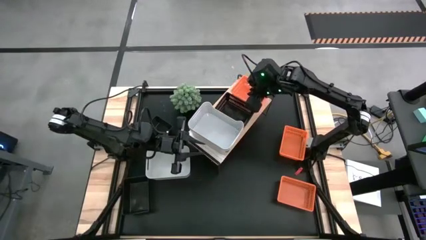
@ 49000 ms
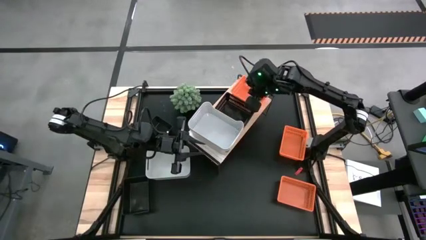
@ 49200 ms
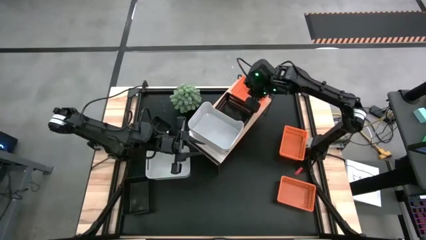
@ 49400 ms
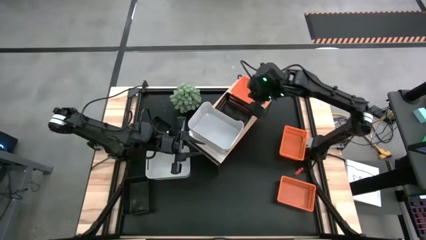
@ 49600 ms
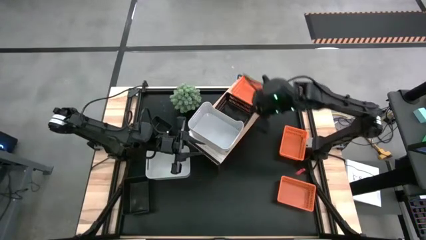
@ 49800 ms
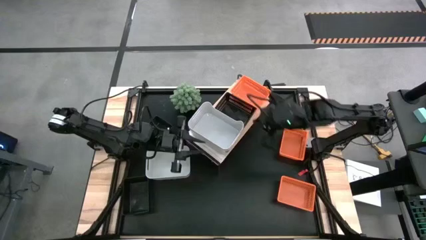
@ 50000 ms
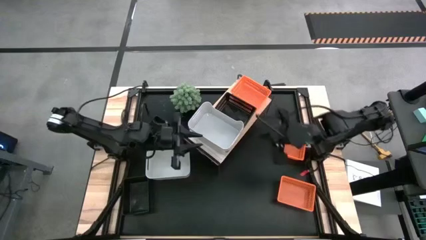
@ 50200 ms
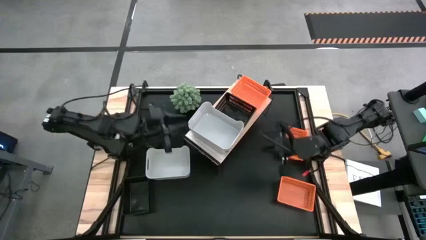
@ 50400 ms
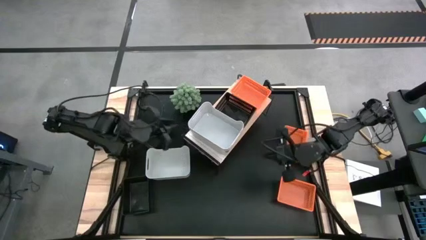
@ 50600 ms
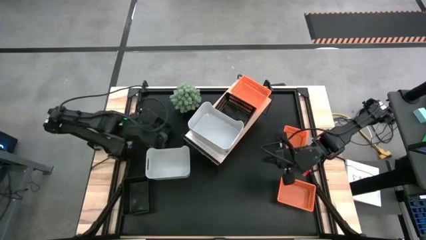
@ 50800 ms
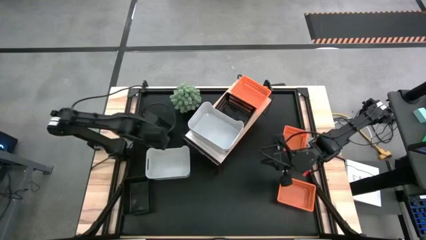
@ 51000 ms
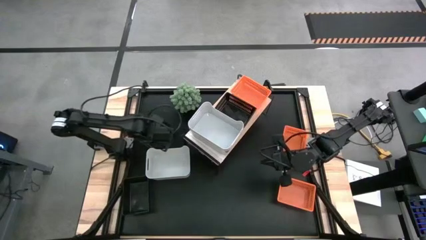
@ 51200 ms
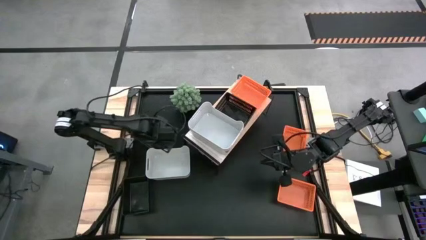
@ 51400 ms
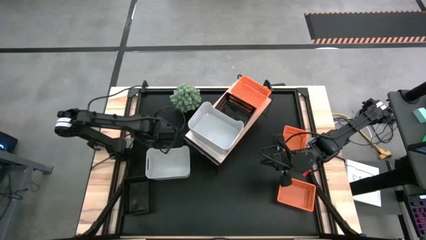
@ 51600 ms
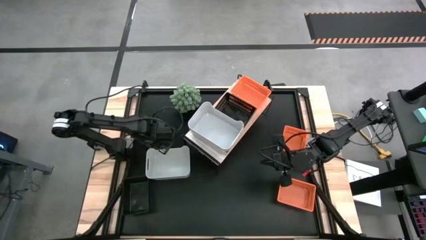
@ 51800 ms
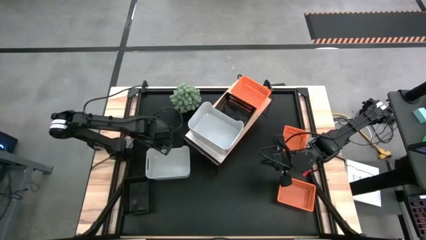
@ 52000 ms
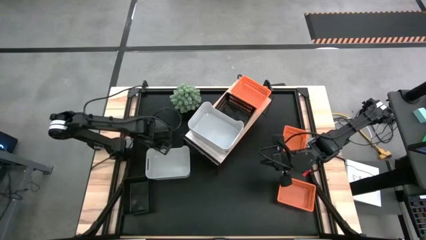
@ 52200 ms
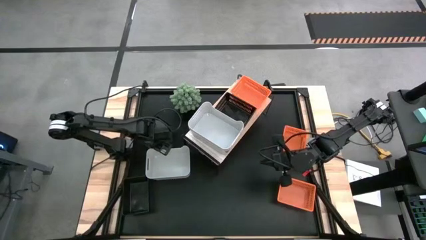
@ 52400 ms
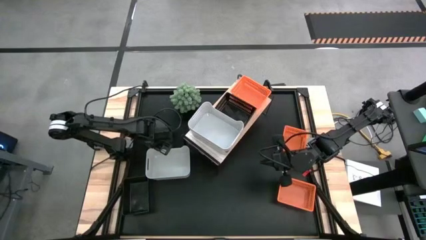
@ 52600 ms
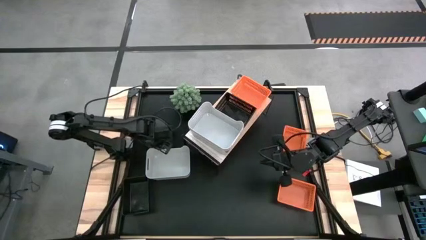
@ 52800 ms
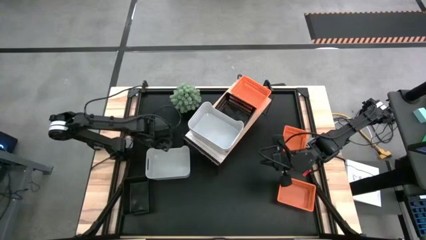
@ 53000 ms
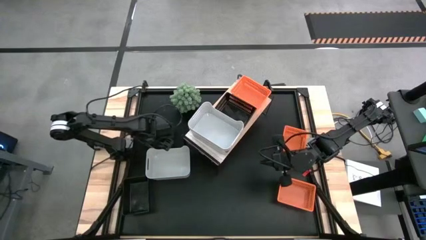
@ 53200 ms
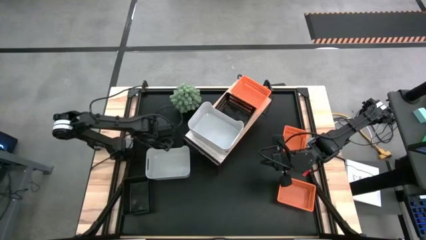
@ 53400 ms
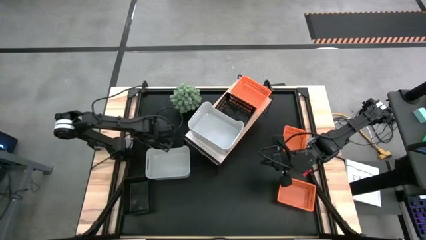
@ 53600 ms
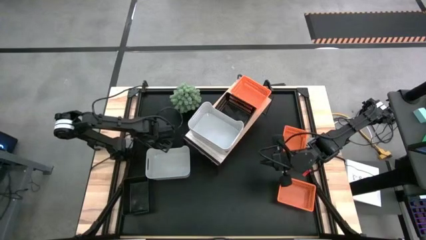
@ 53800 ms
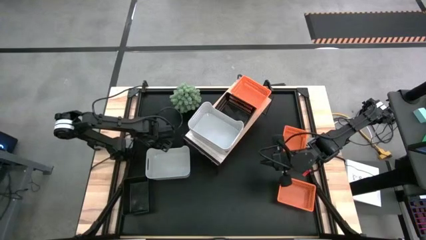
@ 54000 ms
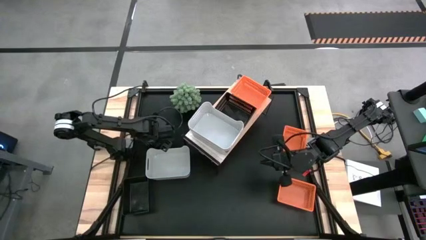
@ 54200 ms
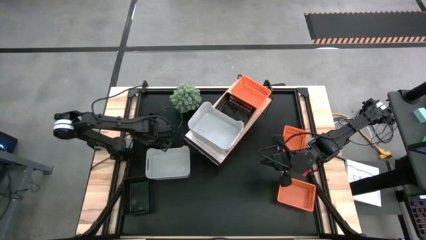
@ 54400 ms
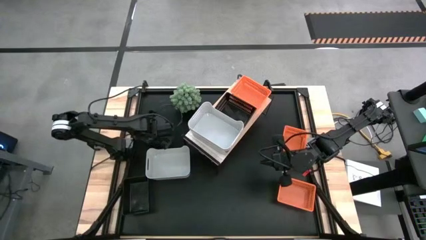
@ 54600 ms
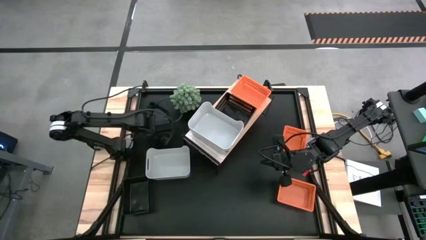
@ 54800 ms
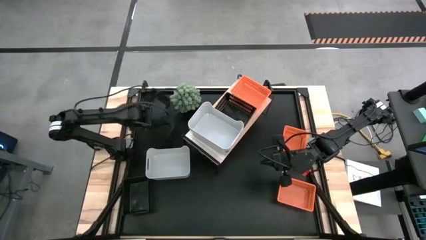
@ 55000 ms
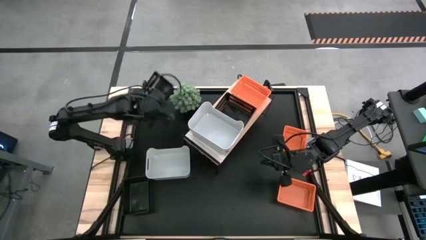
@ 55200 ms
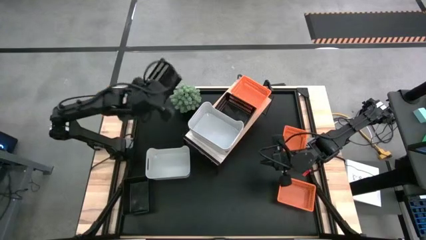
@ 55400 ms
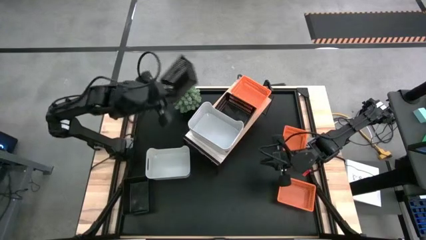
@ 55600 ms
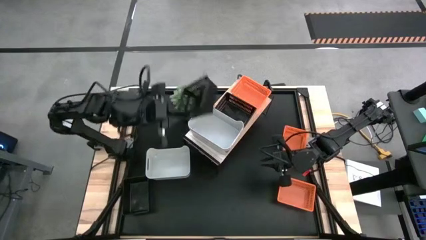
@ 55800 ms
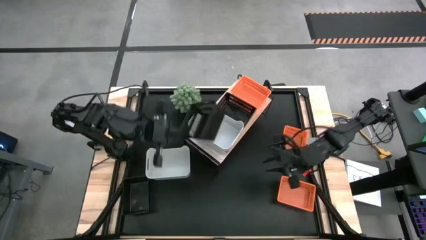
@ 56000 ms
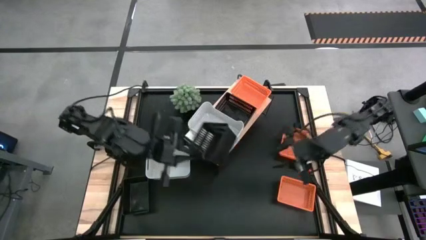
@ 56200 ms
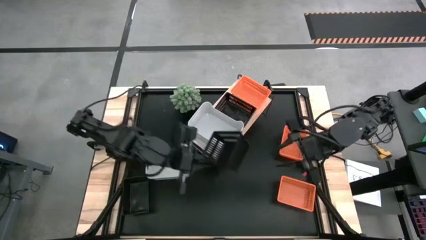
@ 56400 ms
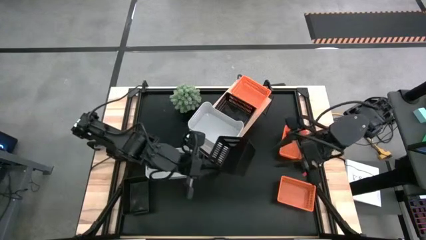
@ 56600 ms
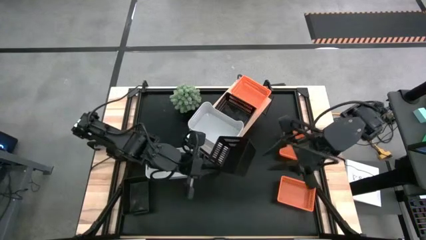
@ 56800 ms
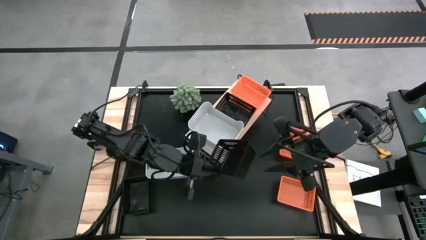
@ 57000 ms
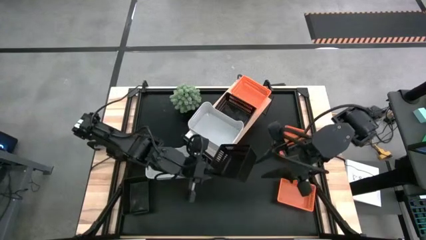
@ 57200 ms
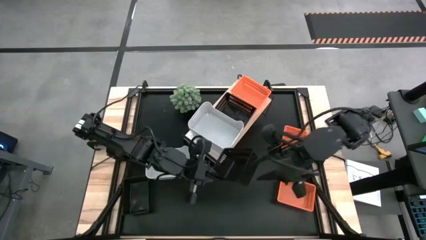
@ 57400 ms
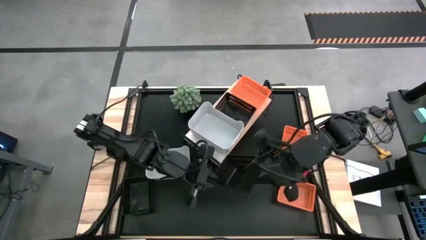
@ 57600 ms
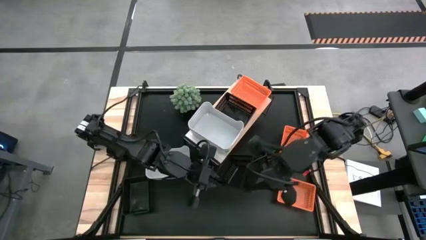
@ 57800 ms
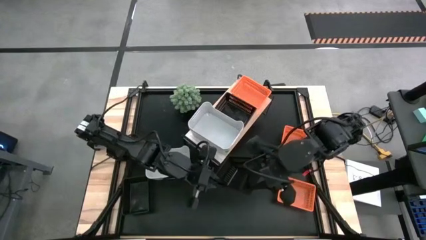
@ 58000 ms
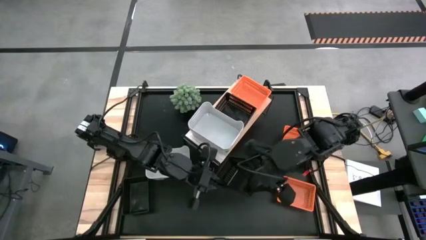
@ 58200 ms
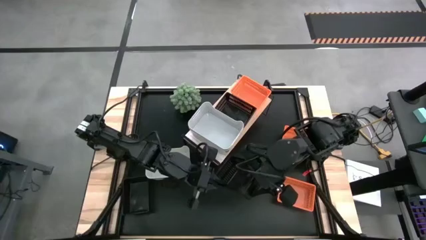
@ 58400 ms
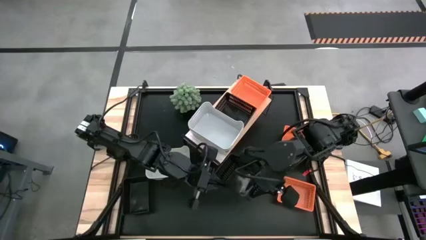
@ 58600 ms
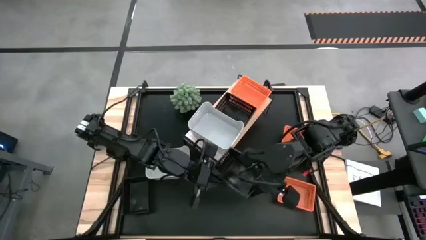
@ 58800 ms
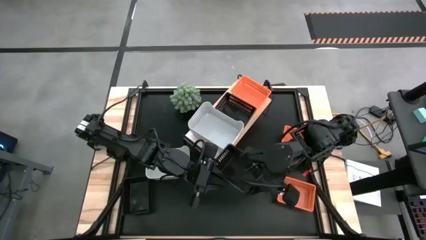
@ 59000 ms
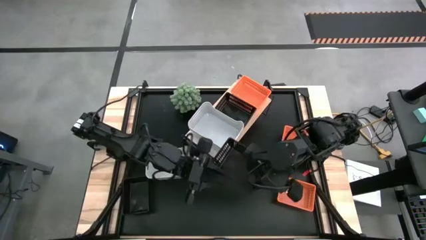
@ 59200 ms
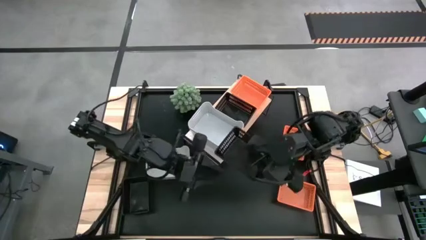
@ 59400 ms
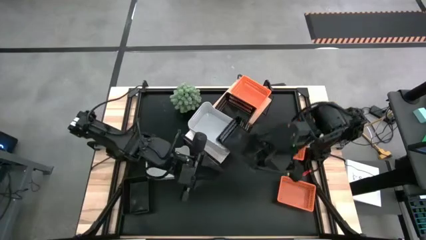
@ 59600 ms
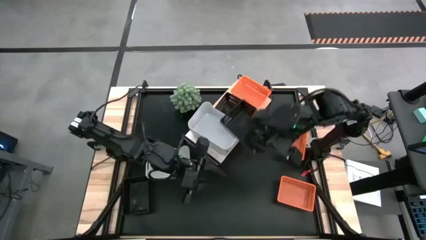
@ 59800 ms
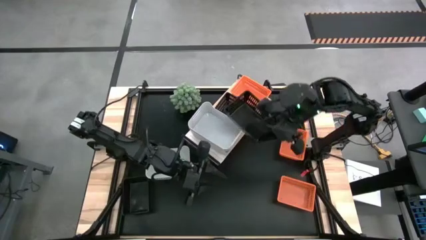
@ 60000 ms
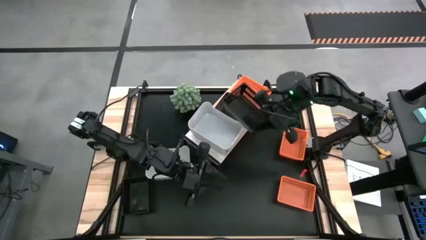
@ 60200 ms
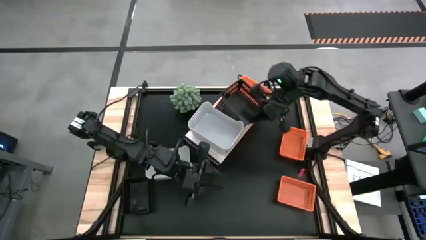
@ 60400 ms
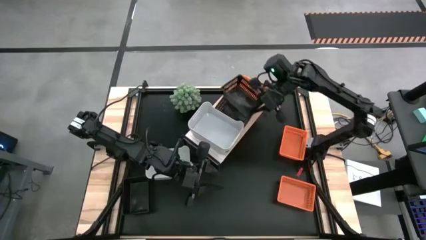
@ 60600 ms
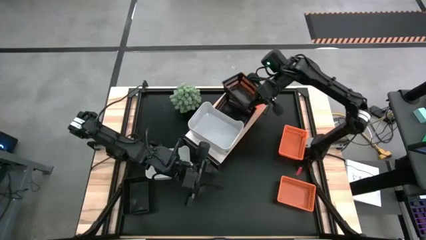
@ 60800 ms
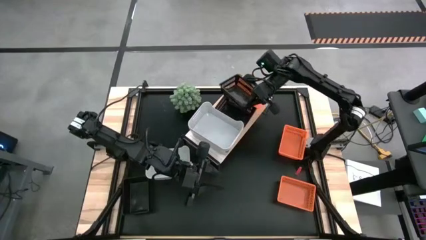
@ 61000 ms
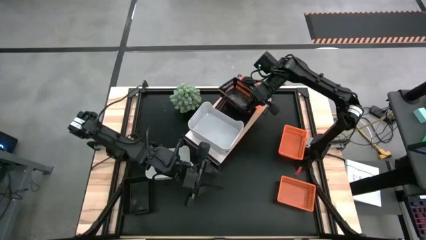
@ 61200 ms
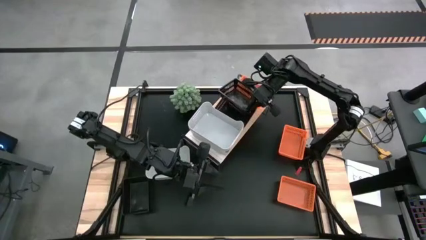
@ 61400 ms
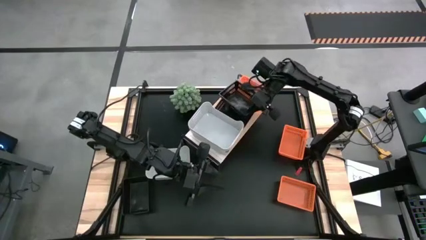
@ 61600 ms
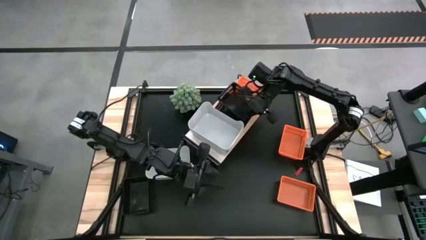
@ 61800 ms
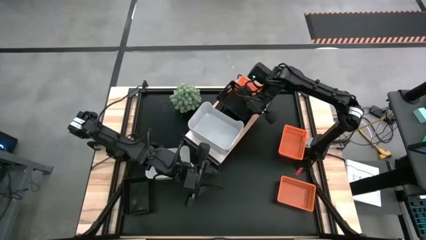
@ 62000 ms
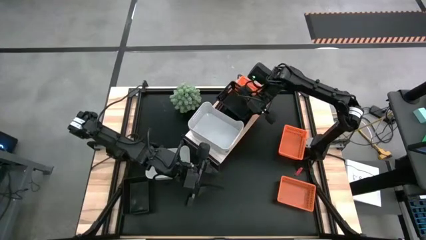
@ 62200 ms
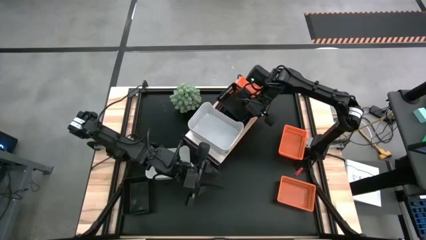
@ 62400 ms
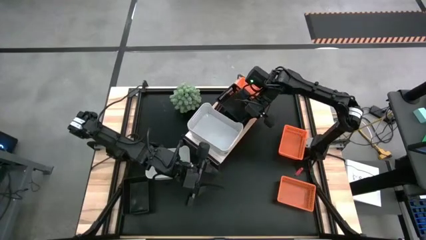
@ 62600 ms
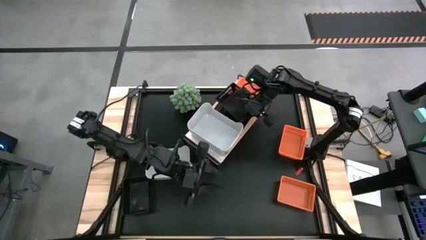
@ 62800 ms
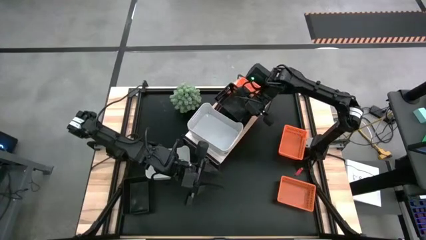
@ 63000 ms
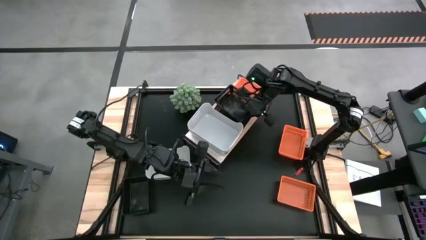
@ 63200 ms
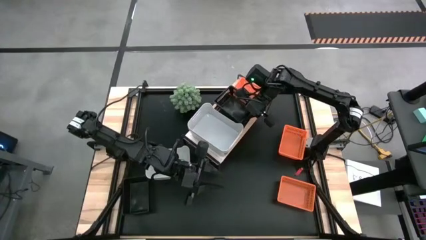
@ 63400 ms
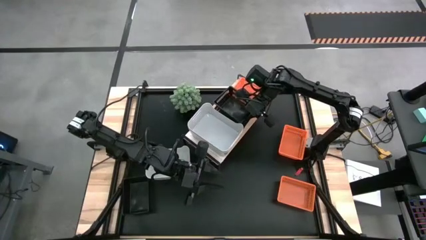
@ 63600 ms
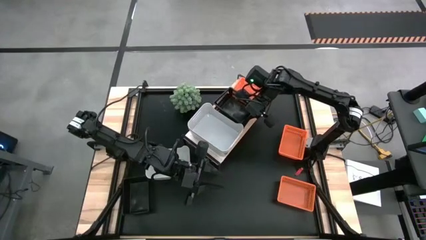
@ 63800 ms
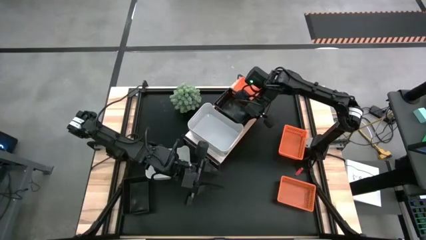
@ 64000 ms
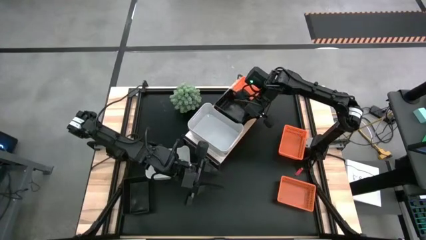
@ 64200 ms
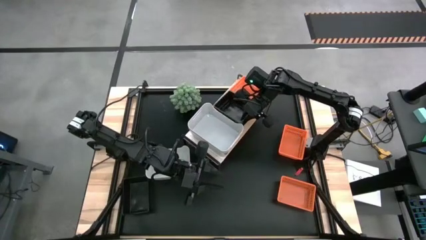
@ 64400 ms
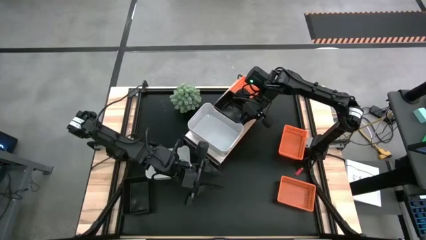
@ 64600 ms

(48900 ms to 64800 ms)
Task: Stack baskets on shelf by color
Stack the top black bin on top of the other black bin on the shelf
